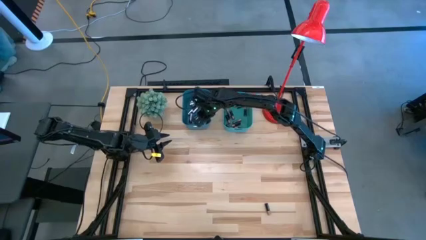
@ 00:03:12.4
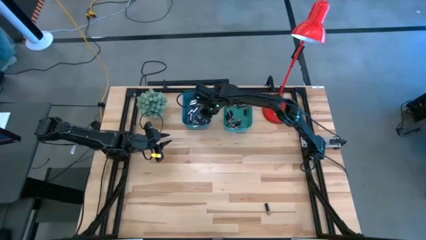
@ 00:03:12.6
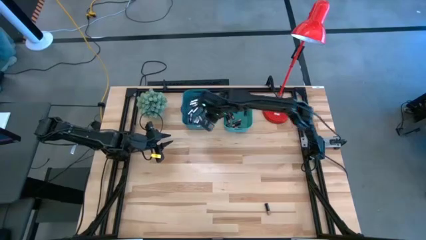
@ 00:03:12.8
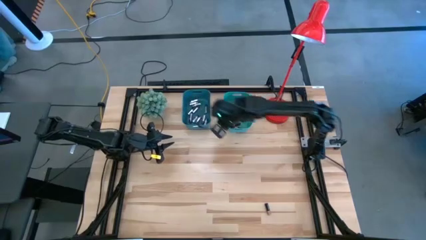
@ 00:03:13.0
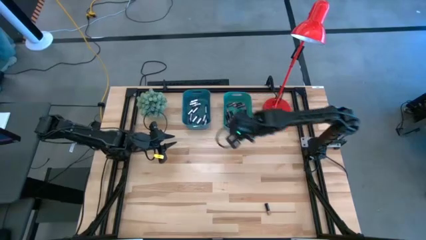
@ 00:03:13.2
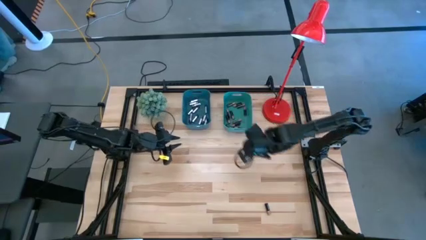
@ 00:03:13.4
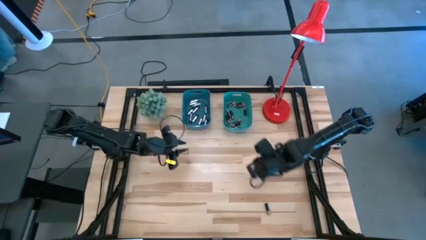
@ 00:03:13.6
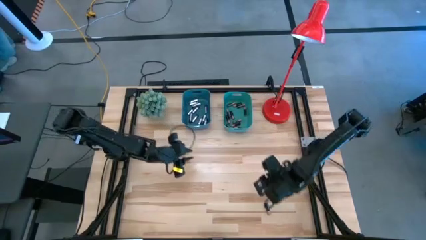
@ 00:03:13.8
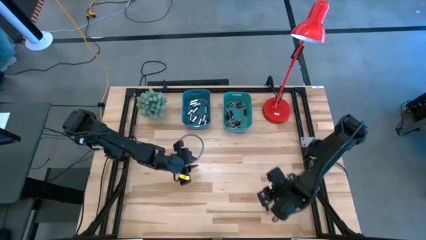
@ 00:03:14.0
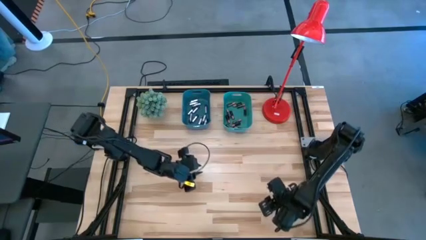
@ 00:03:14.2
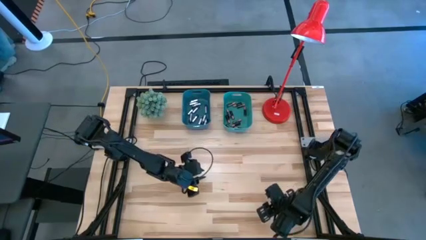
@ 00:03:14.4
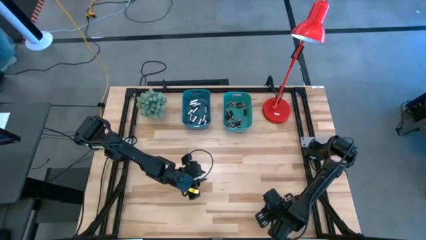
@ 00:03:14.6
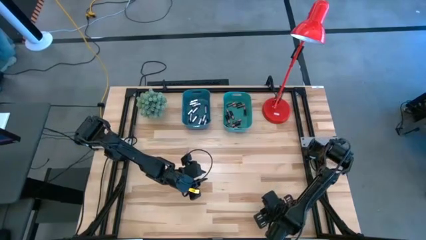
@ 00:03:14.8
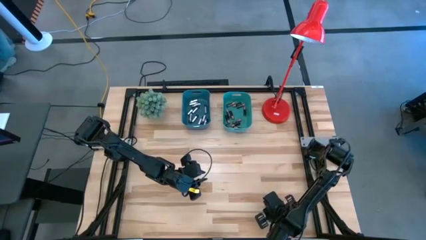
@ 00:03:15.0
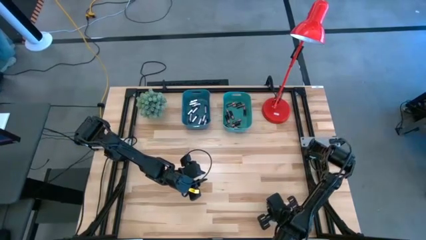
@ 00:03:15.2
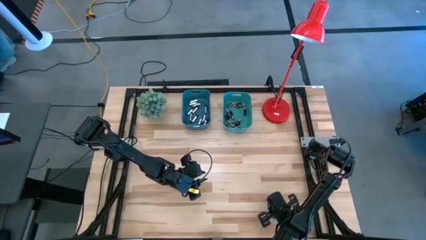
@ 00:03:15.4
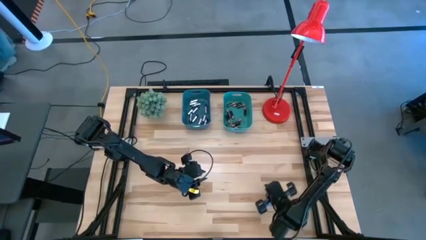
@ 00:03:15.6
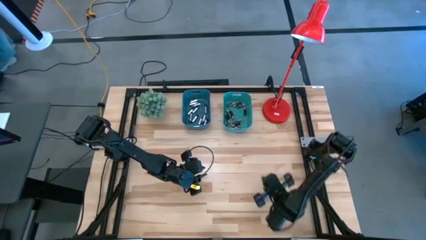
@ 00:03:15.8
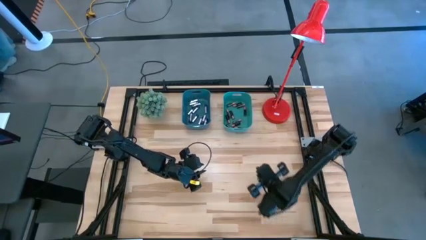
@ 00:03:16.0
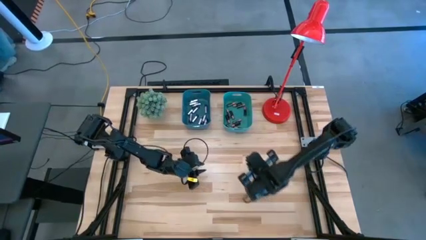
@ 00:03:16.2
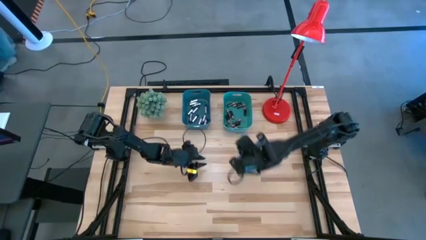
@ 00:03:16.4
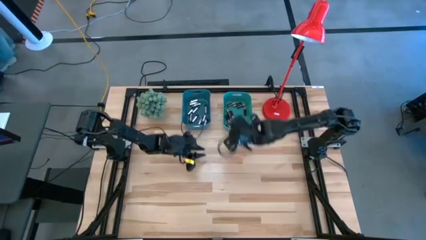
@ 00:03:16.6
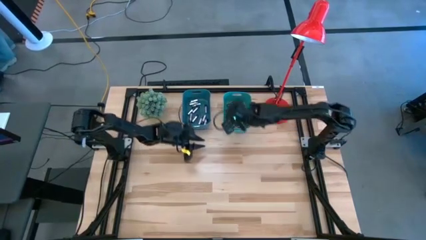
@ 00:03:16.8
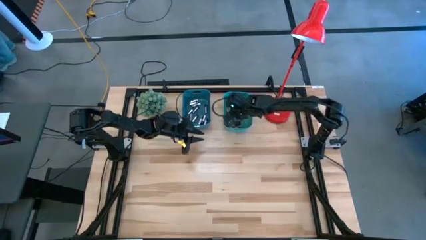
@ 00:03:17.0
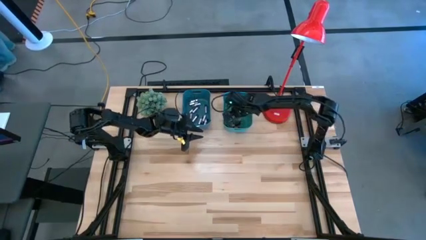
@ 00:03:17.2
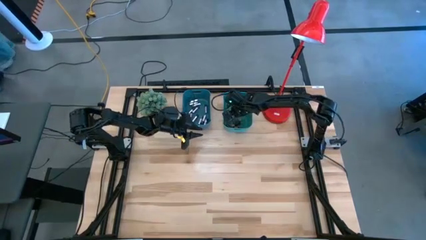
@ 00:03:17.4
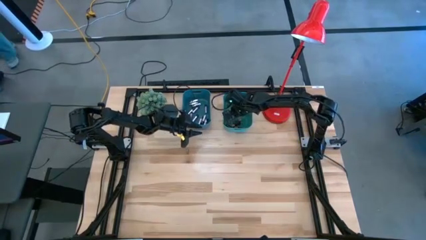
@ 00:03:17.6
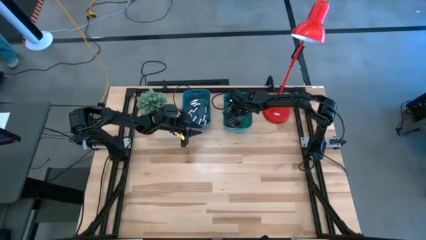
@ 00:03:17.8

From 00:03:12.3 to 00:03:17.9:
Task: Sort batteries
Put the black battery into the green bin

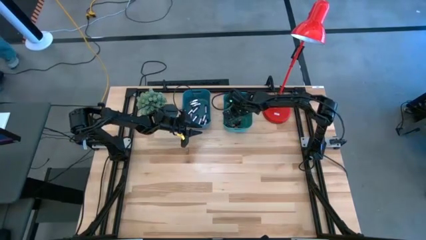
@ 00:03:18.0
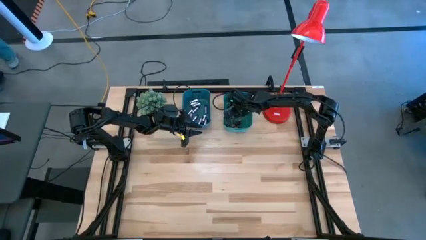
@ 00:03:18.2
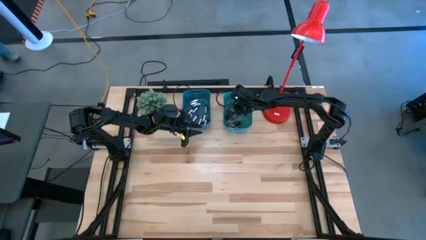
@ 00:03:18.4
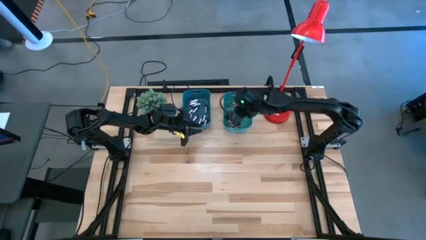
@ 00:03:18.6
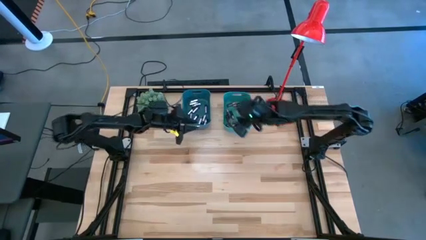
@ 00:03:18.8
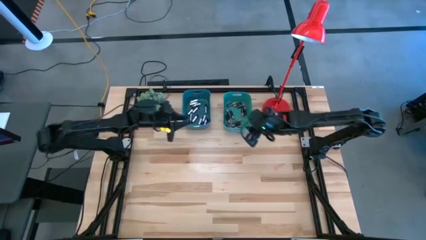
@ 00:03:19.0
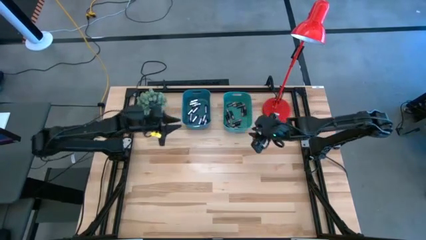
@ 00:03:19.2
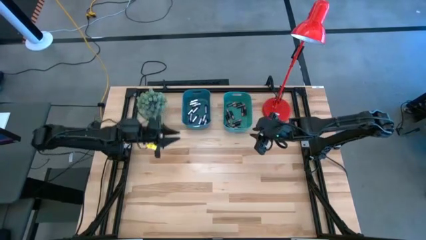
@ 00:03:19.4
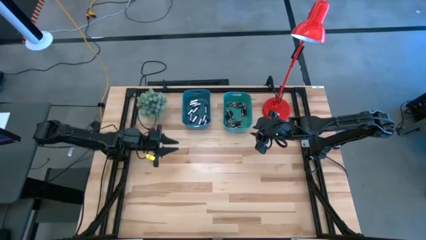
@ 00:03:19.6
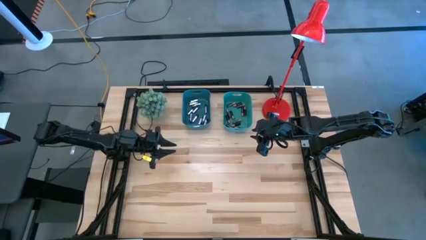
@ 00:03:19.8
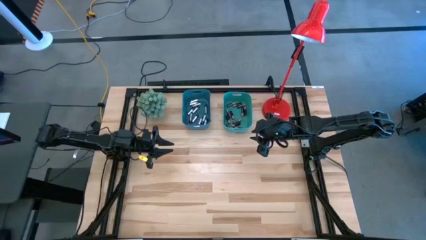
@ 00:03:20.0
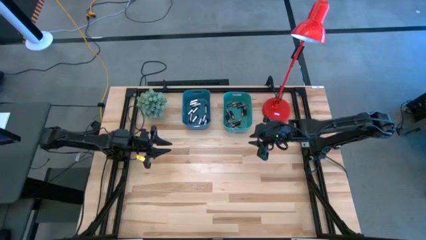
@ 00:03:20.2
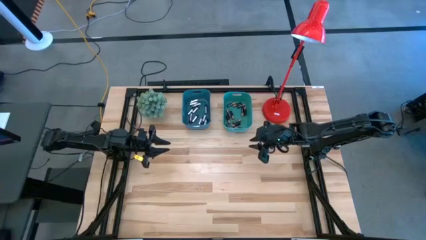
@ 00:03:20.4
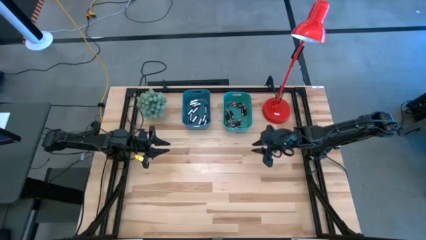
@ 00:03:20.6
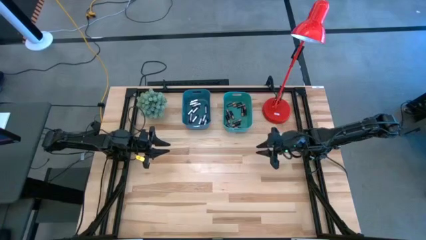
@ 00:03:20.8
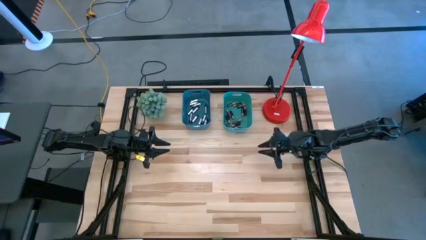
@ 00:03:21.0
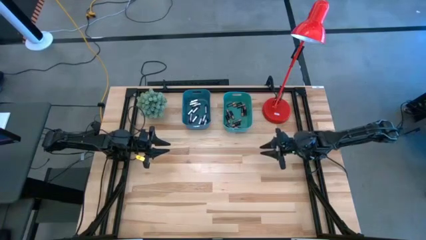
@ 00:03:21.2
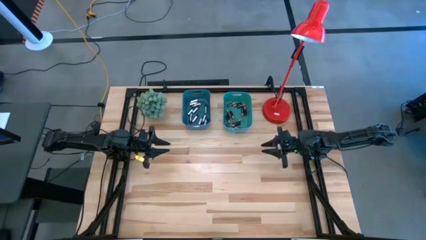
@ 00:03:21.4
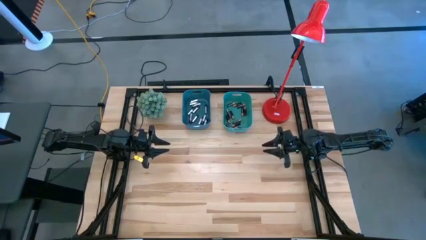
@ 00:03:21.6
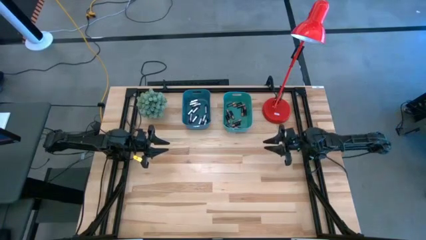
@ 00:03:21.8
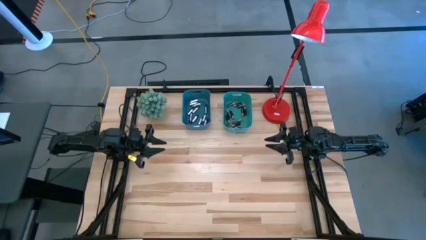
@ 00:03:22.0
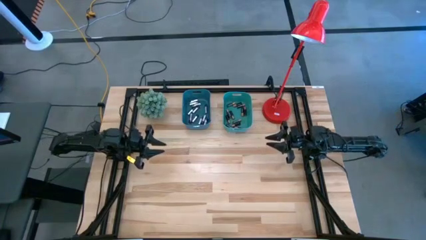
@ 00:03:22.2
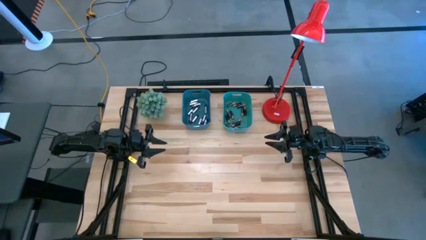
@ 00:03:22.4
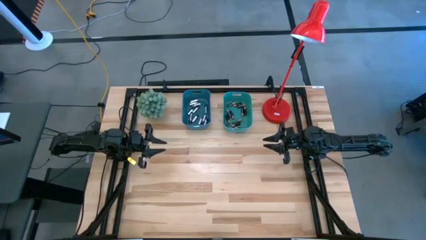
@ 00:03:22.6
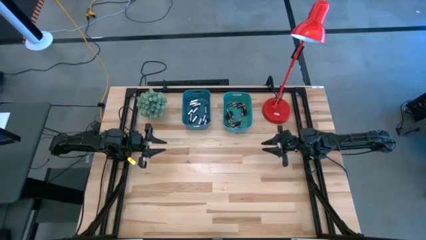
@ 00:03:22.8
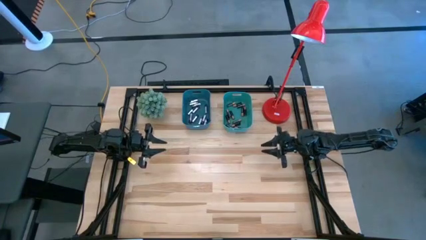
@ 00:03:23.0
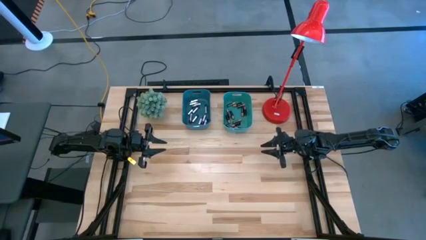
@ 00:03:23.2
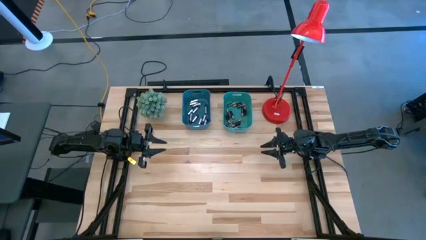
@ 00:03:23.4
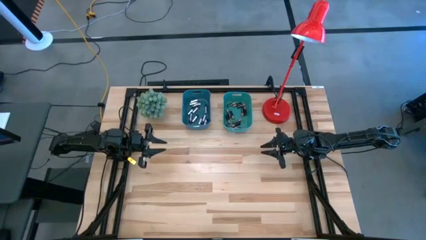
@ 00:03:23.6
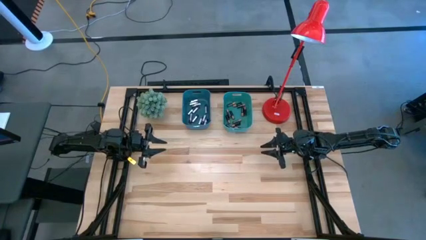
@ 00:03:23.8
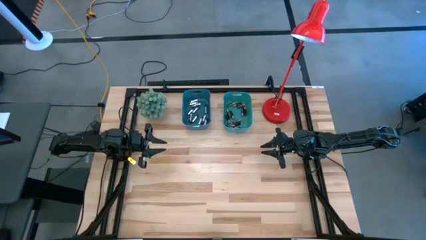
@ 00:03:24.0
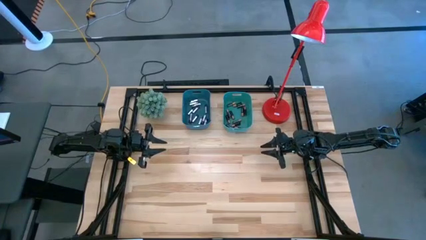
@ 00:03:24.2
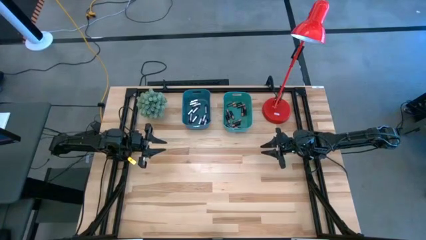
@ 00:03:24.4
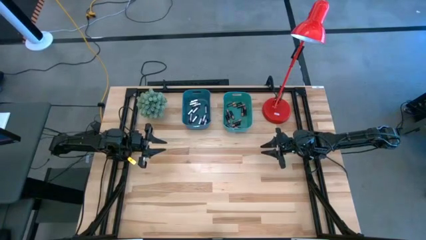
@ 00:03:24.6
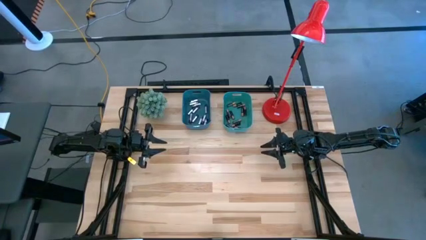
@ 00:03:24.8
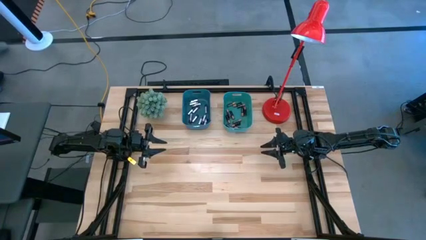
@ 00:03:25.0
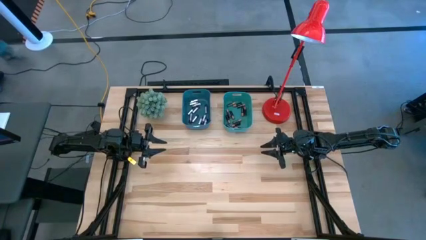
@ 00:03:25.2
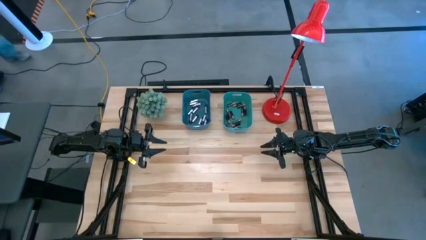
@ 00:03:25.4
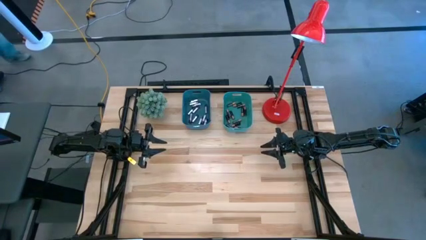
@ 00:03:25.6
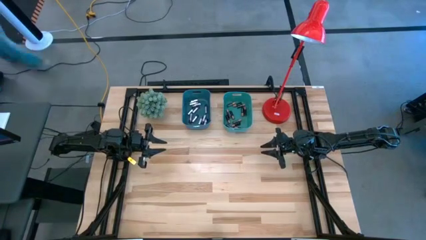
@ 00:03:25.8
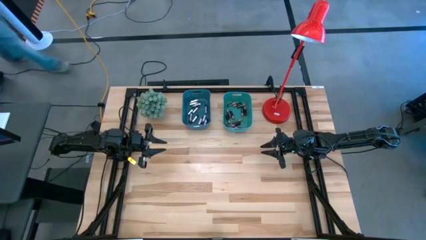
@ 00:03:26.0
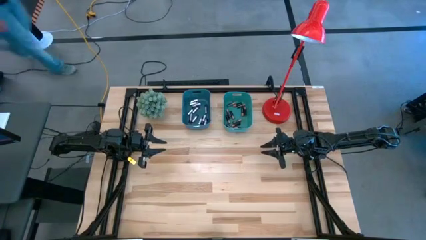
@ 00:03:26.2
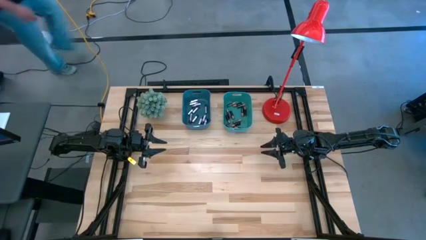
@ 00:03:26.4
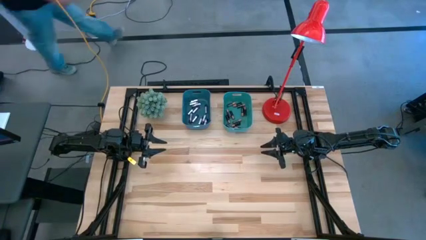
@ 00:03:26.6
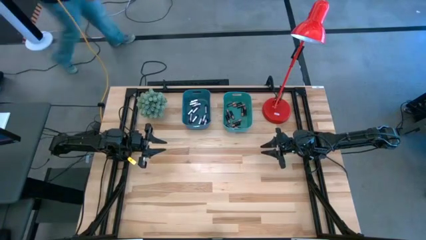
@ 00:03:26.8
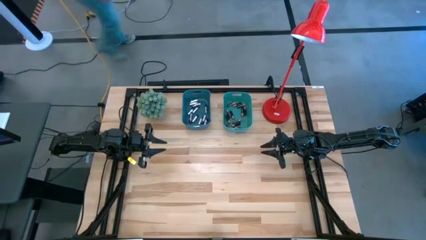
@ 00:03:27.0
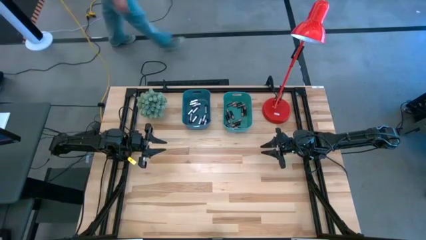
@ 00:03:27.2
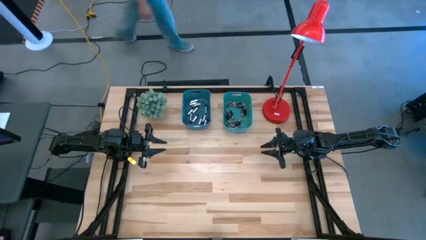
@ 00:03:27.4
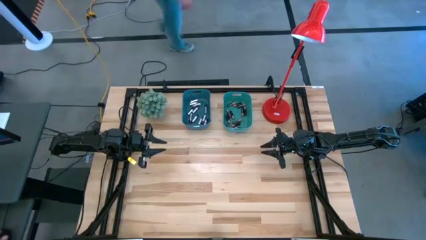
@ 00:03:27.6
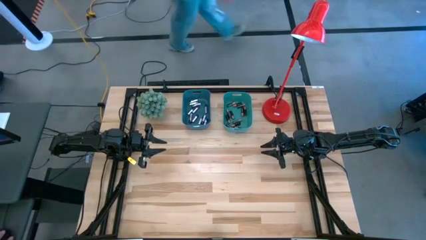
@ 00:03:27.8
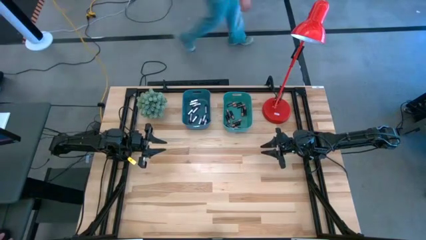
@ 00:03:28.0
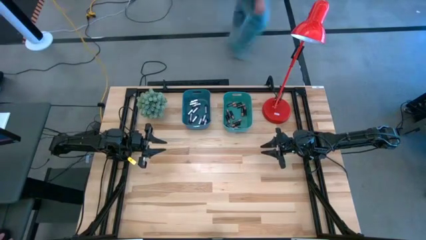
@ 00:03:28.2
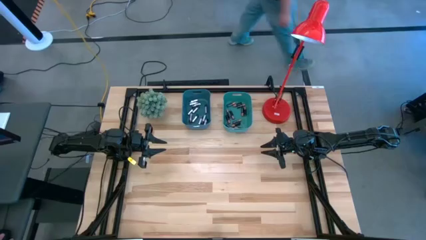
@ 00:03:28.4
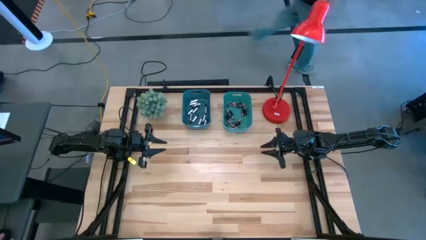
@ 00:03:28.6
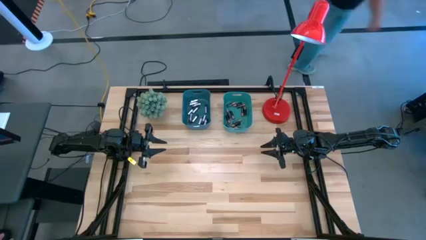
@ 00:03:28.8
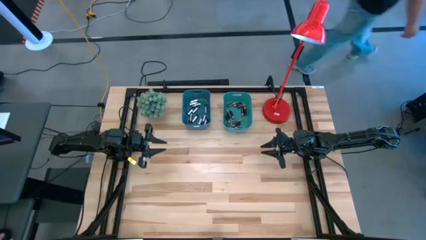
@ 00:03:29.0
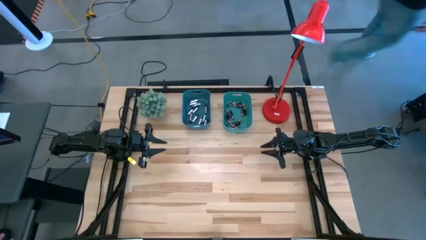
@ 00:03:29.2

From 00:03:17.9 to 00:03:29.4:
Return to Home Position
